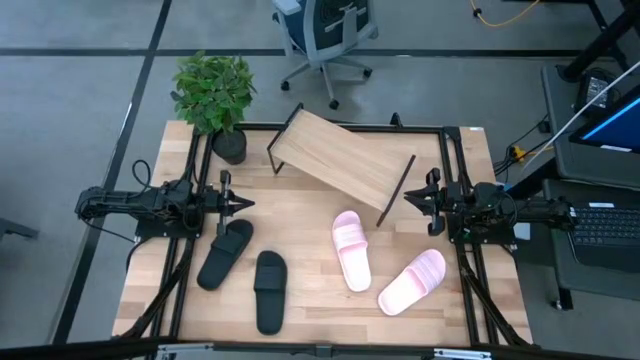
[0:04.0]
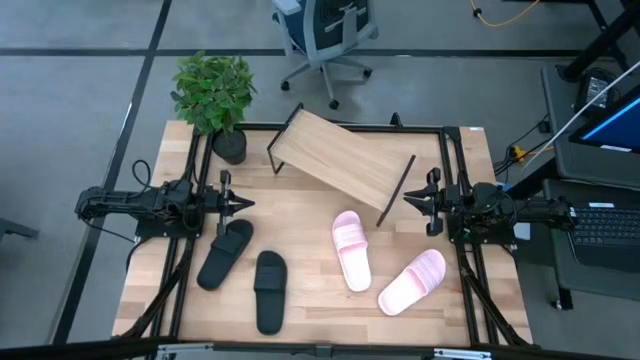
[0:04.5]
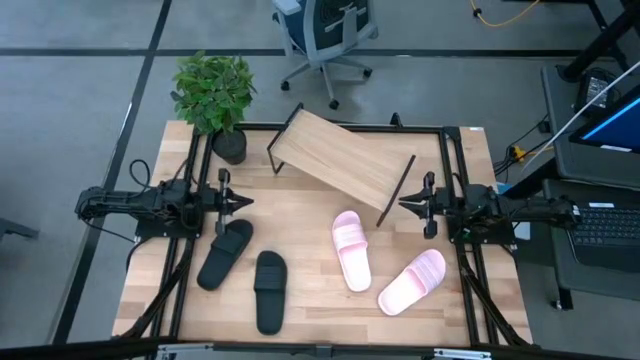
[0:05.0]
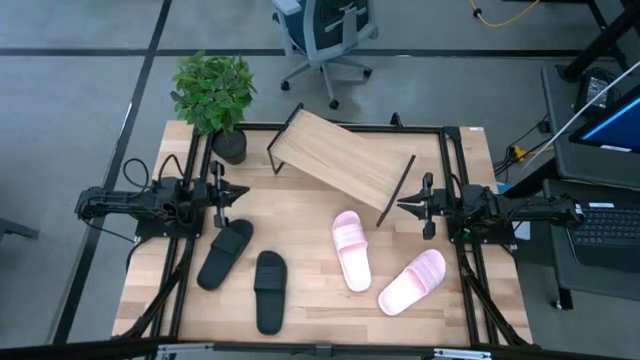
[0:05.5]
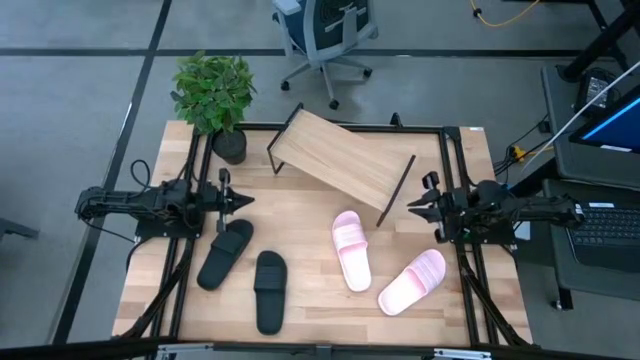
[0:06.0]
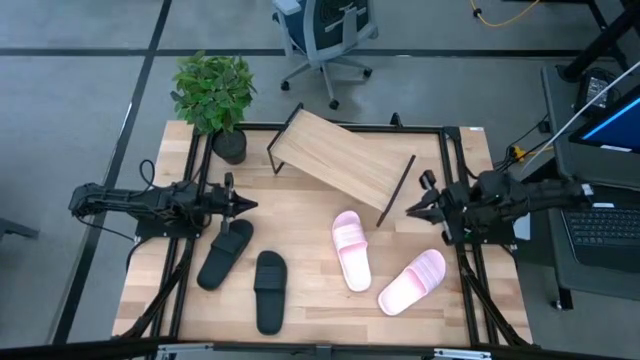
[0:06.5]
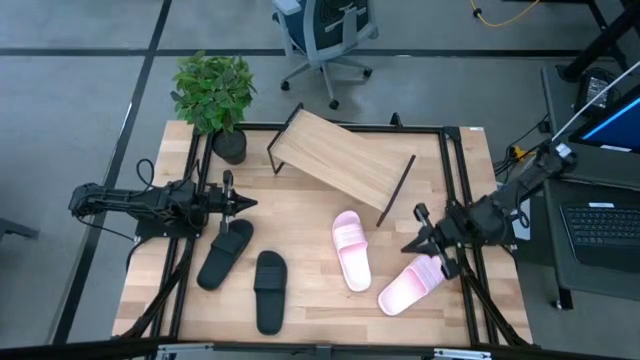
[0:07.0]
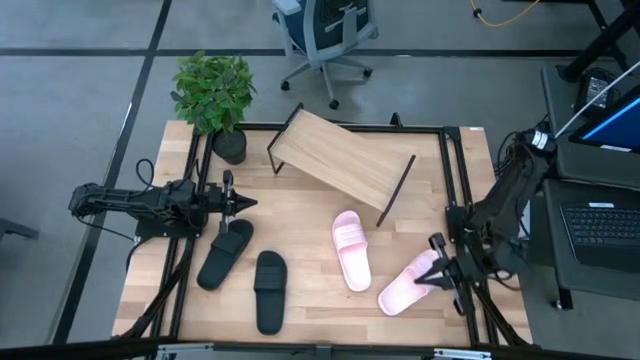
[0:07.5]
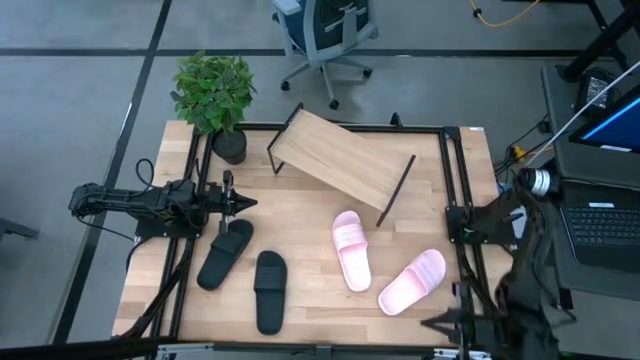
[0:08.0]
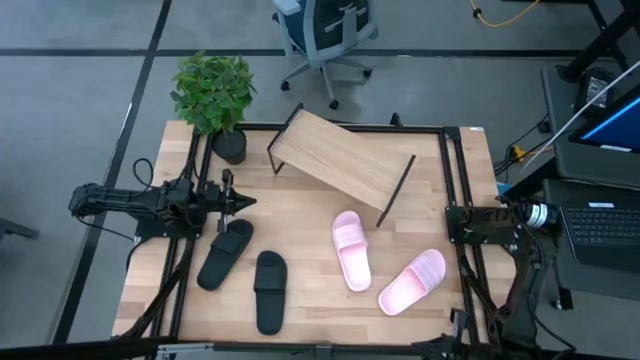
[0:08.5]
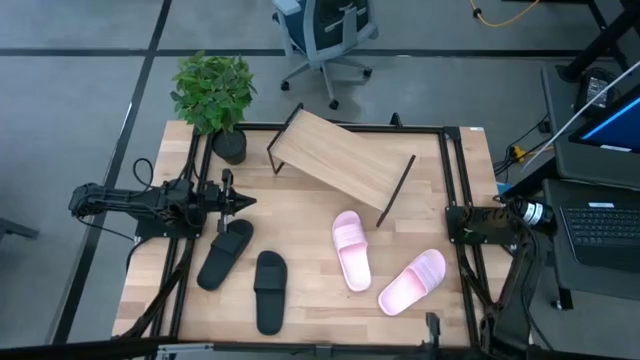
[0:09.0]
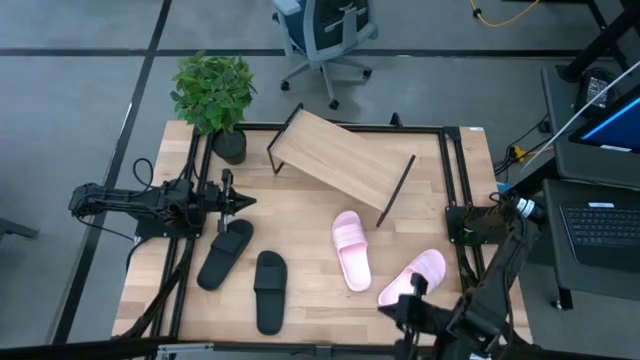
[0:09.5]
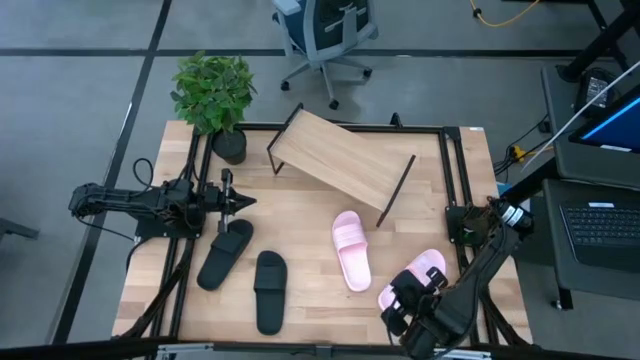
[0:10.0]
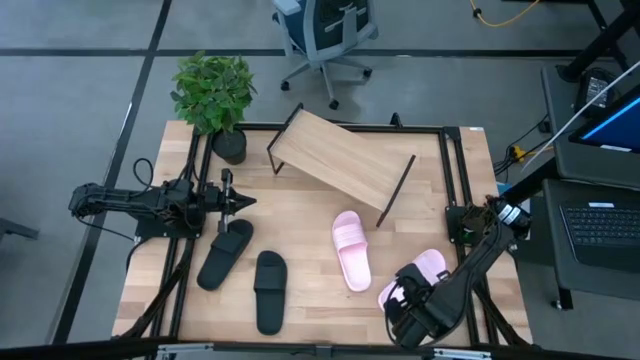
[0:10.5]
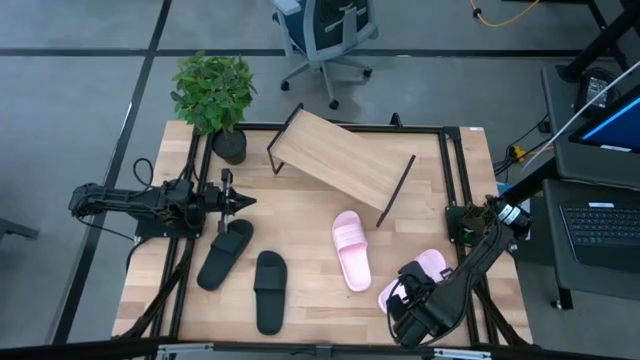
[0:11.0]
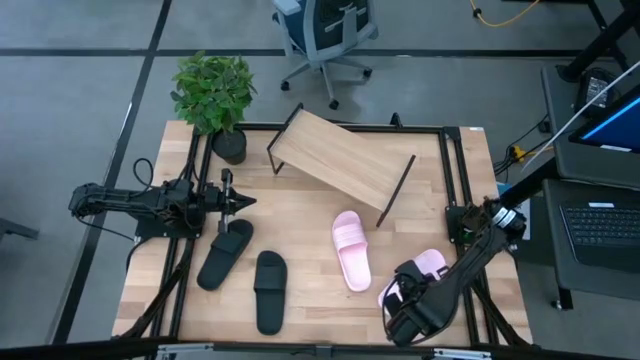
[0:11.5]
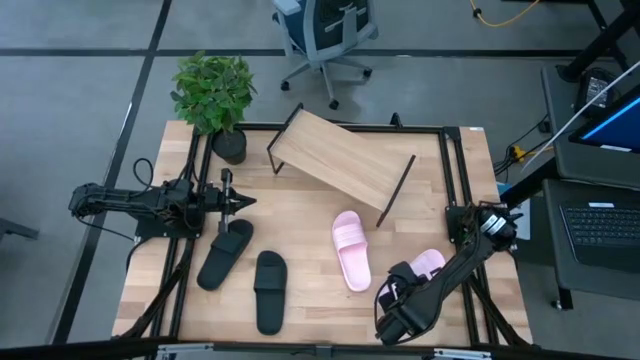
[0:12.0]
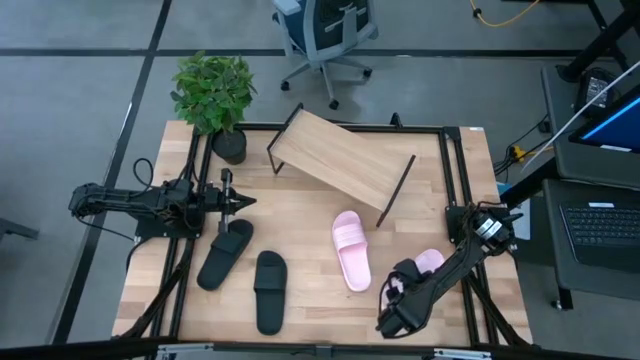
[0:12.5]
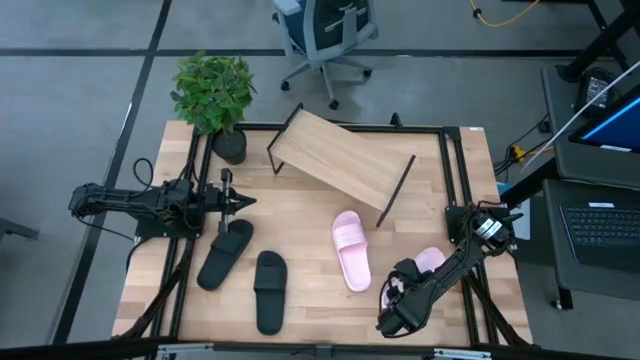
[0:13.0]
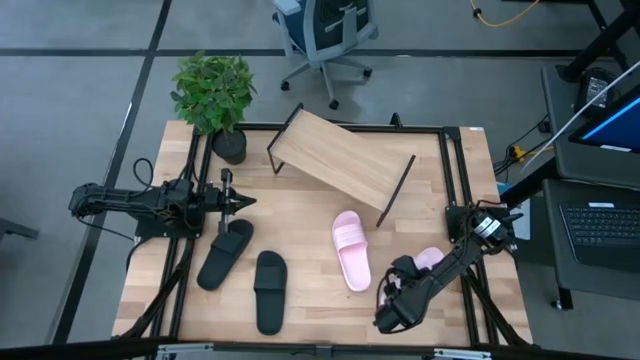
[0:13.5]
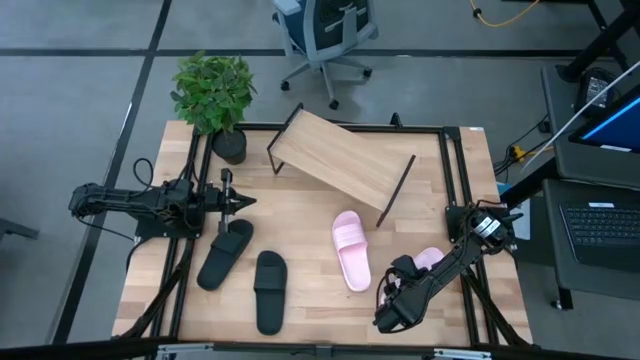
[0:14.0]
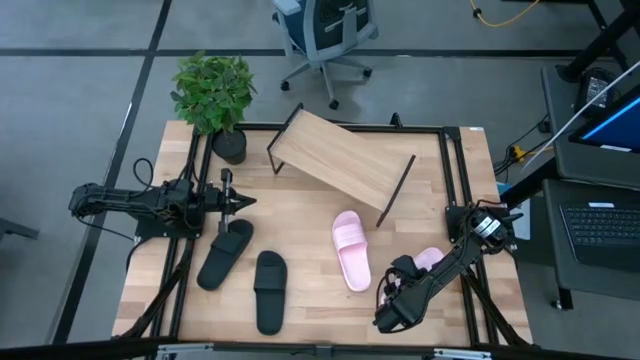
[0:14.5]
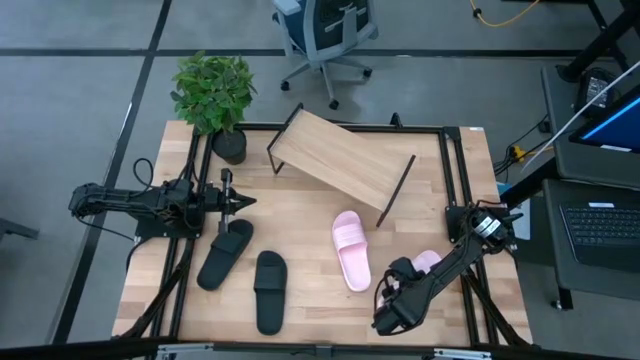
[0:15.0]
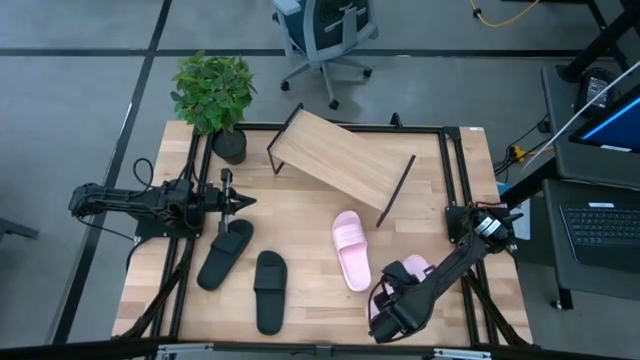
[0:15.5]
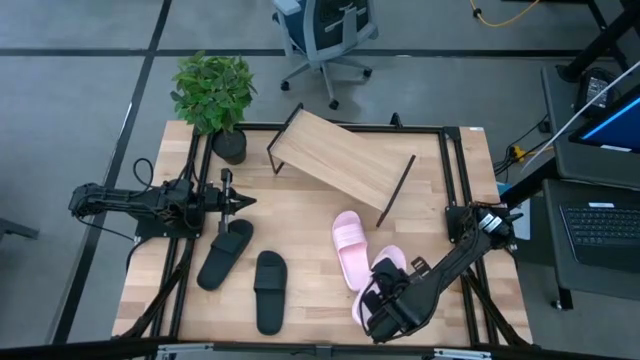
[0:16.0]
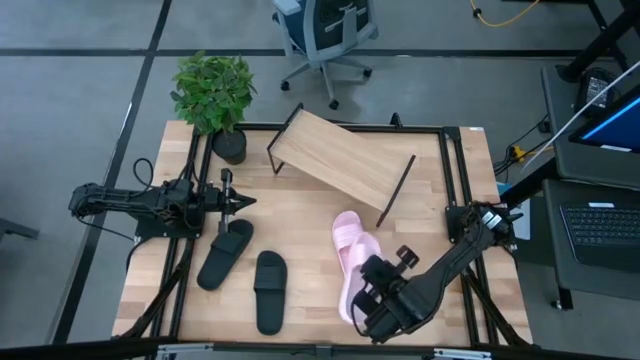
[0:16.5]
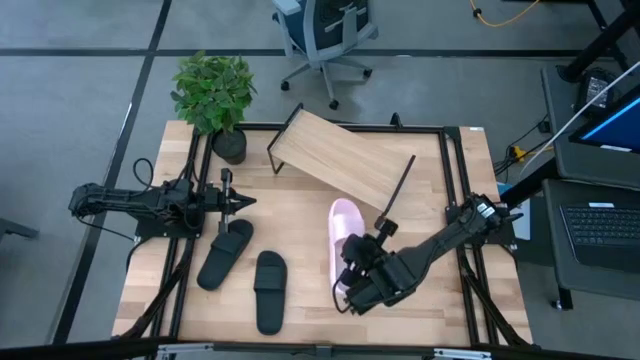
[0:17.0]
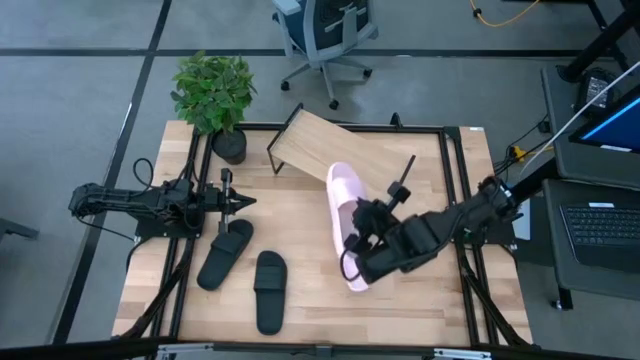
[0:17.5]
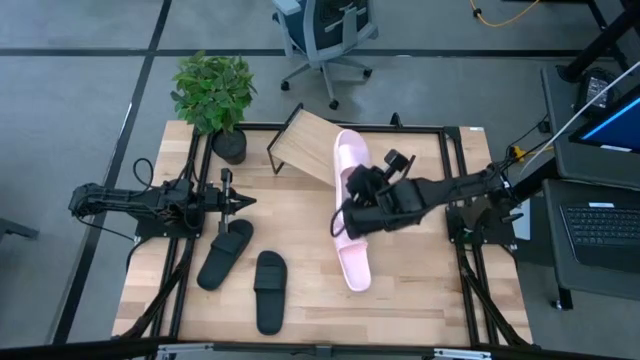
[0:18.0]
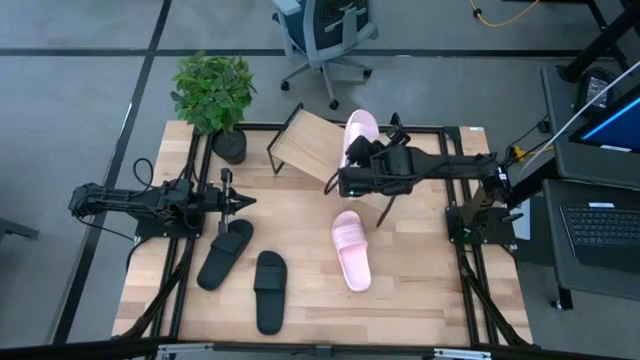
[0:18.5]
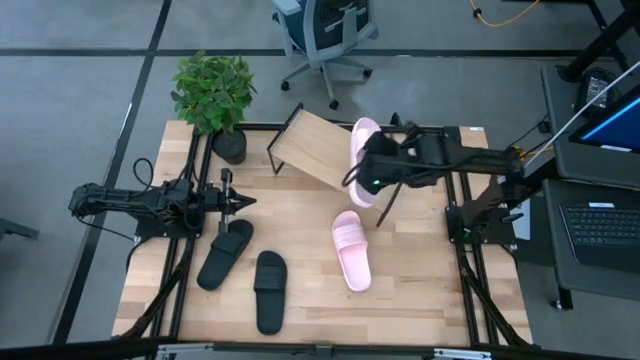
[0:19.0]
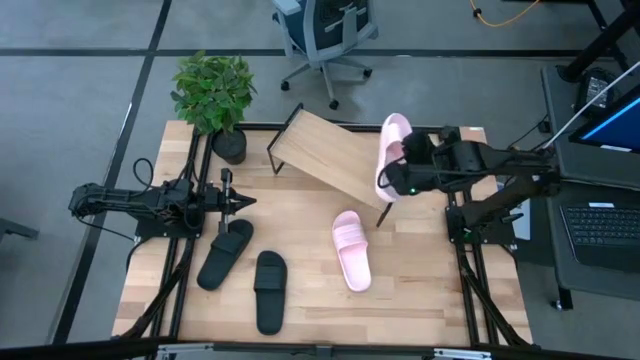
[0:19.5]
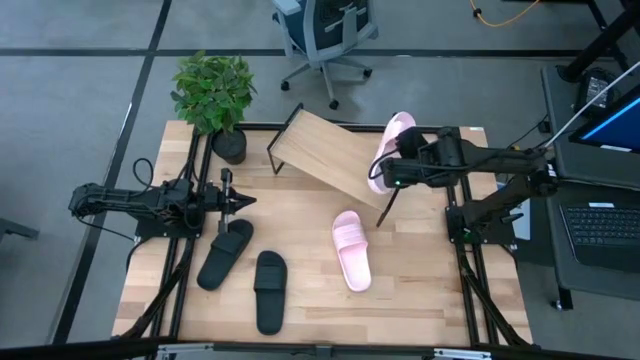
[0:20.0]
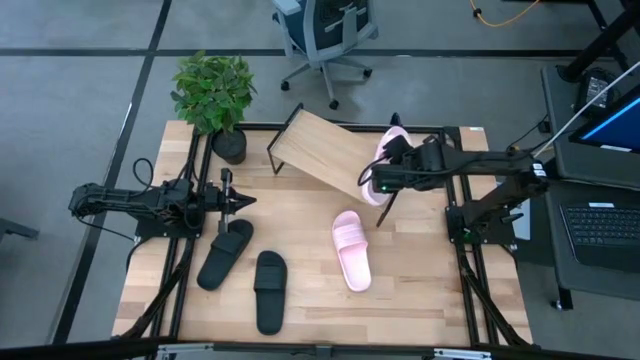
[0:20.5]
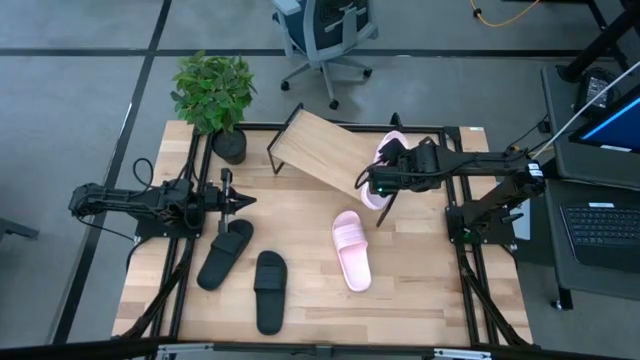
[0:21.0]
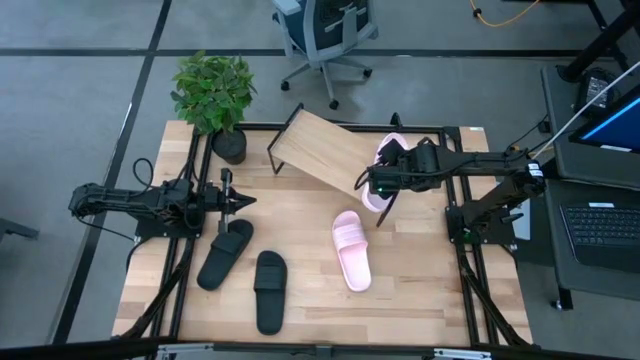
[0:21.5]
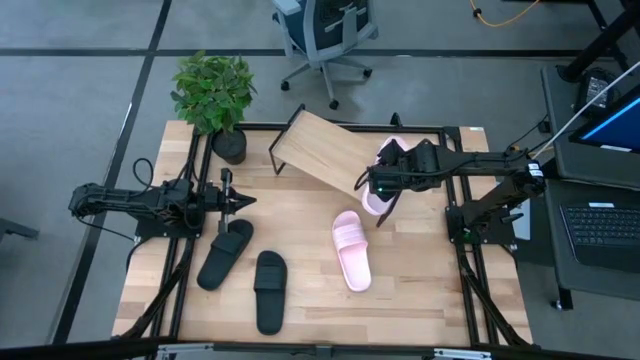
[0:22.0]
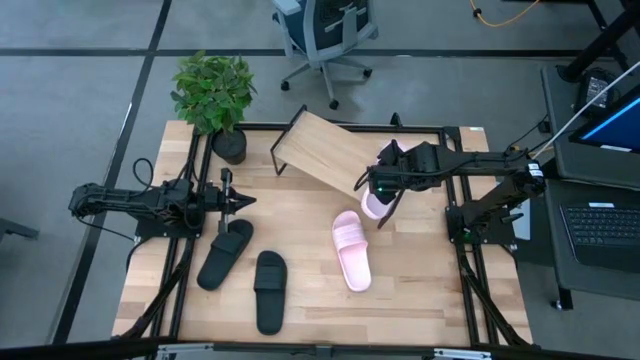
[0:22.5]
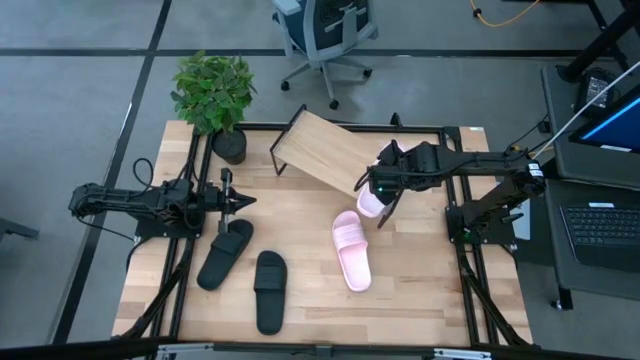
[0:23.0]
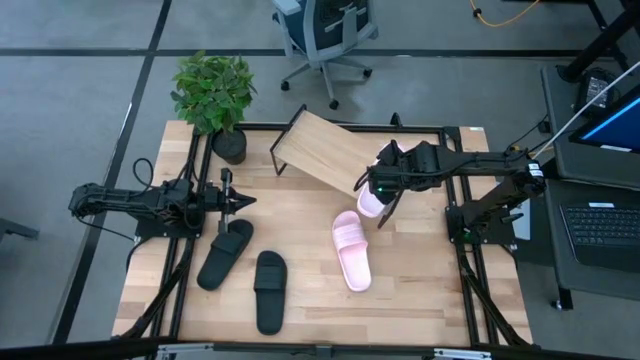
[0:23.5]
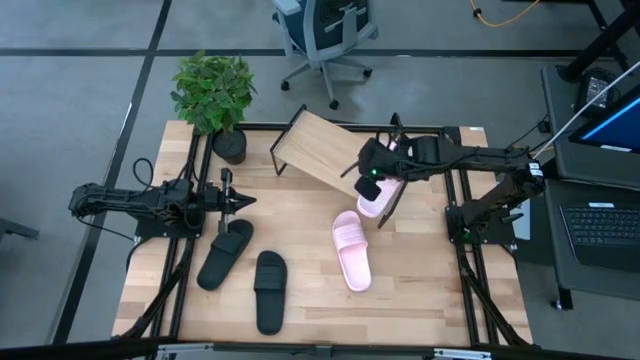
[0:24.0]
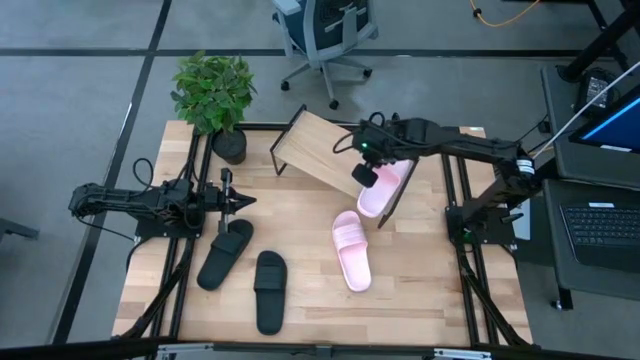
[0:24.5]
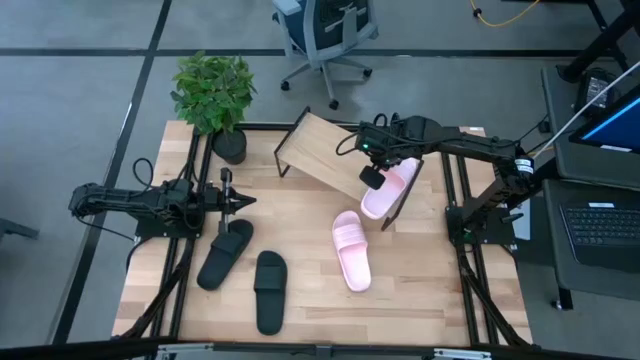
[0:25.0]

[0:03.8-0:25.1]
Task: Pick and place slides into the shelf
Put the right pink slide on the shelf
